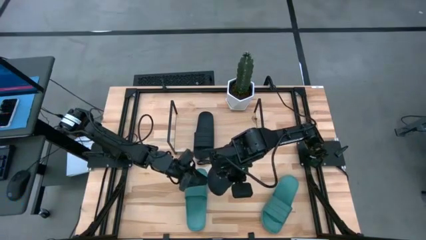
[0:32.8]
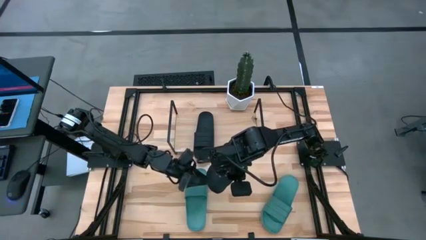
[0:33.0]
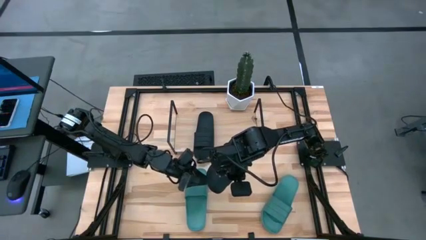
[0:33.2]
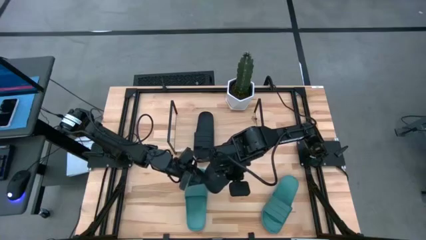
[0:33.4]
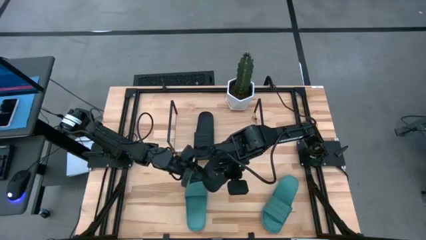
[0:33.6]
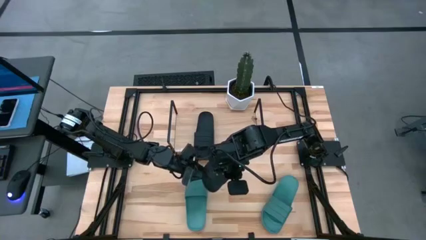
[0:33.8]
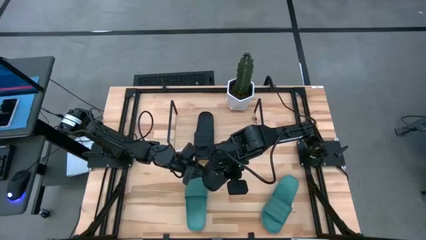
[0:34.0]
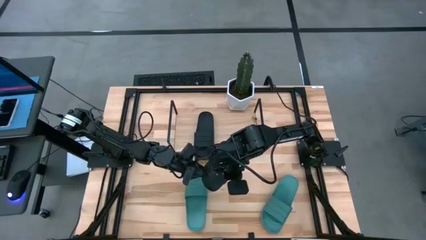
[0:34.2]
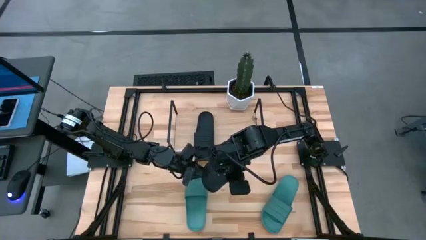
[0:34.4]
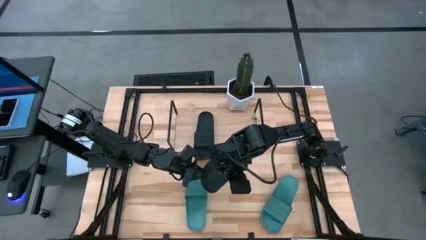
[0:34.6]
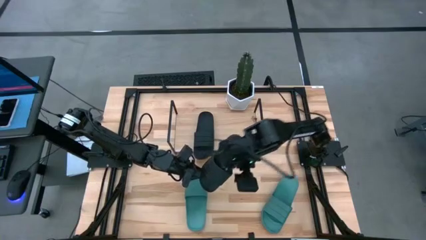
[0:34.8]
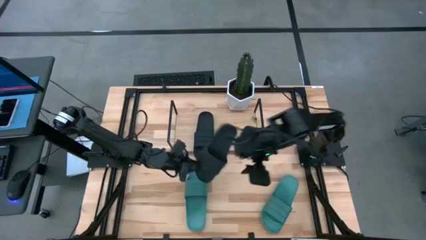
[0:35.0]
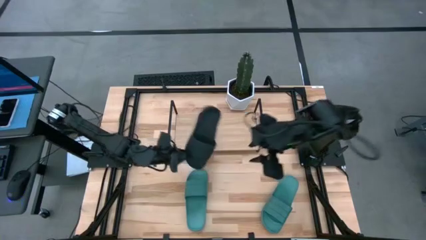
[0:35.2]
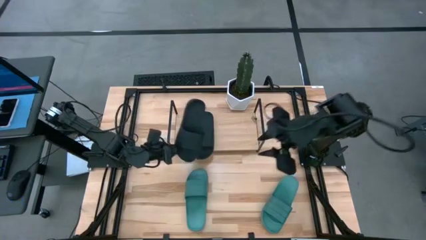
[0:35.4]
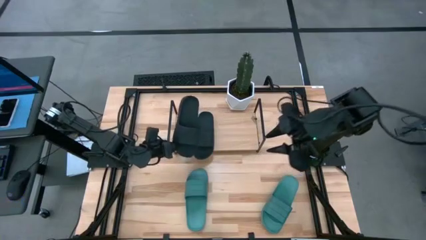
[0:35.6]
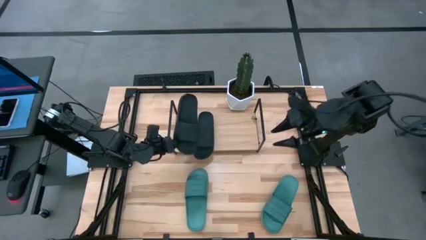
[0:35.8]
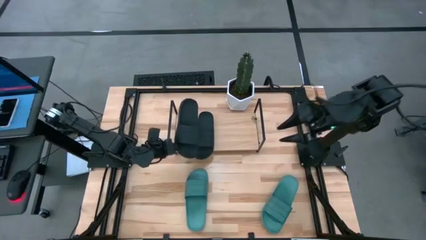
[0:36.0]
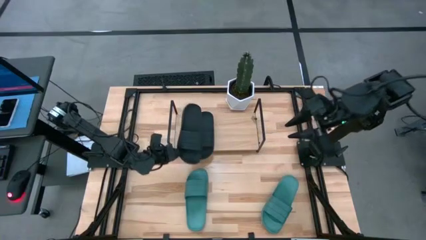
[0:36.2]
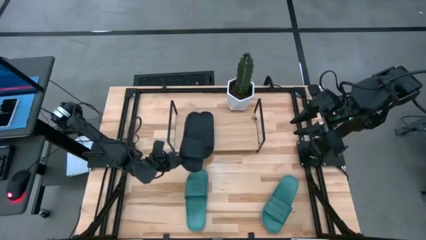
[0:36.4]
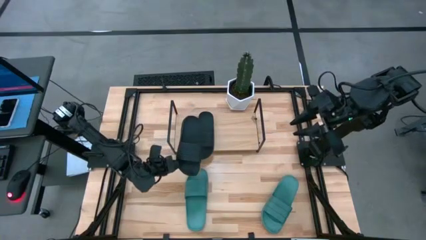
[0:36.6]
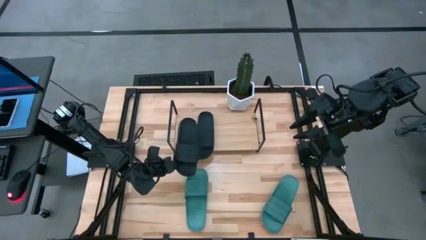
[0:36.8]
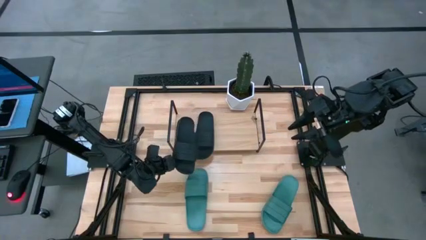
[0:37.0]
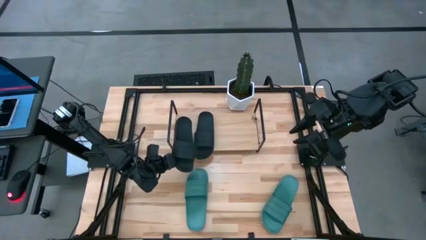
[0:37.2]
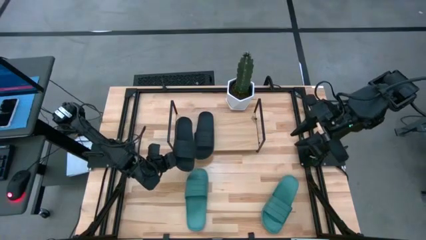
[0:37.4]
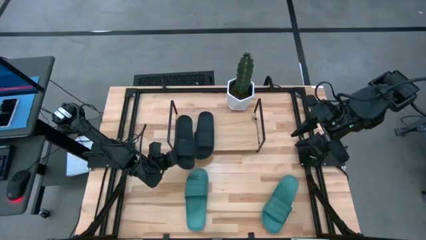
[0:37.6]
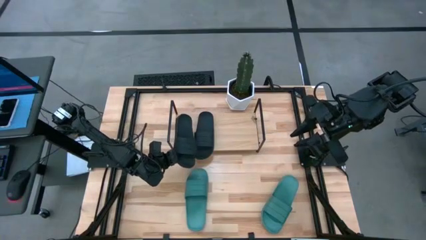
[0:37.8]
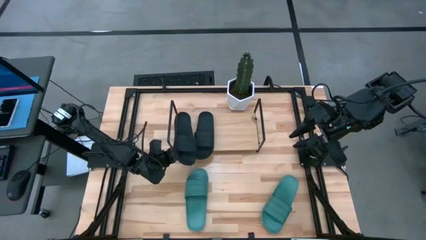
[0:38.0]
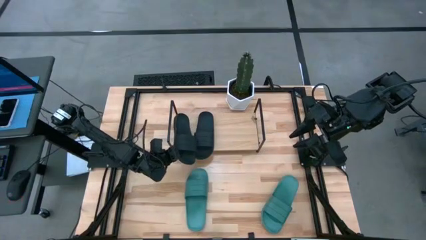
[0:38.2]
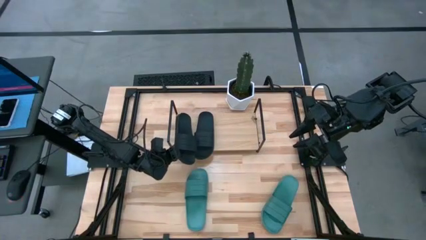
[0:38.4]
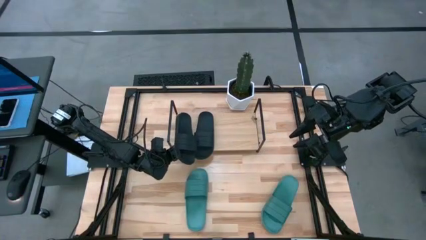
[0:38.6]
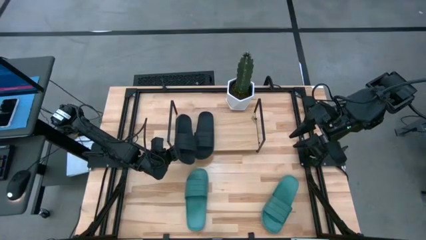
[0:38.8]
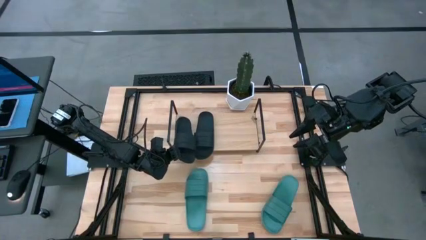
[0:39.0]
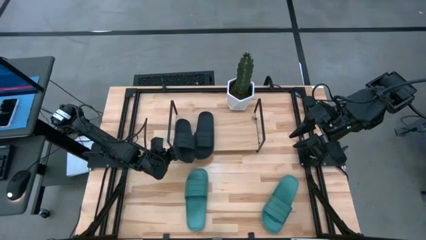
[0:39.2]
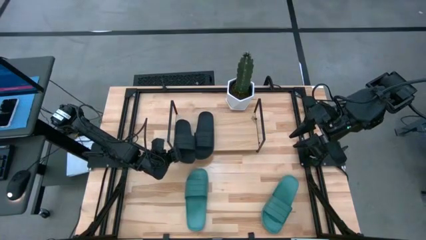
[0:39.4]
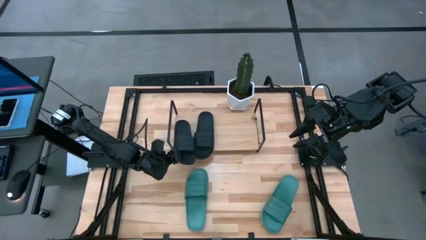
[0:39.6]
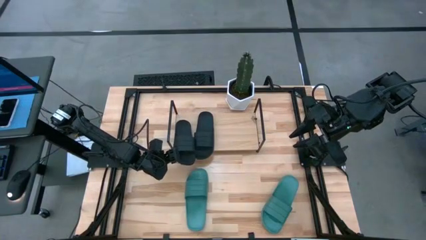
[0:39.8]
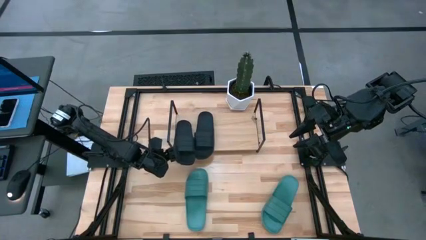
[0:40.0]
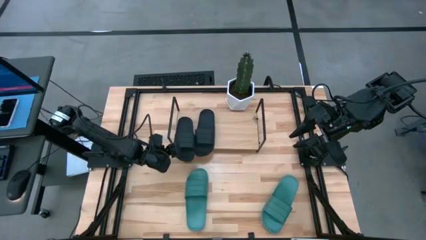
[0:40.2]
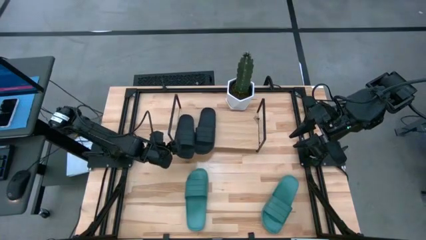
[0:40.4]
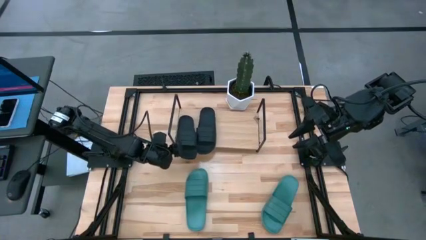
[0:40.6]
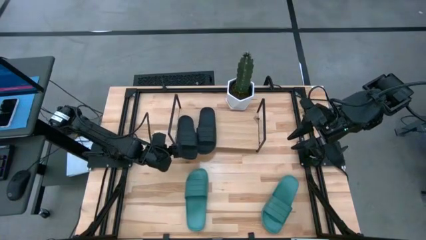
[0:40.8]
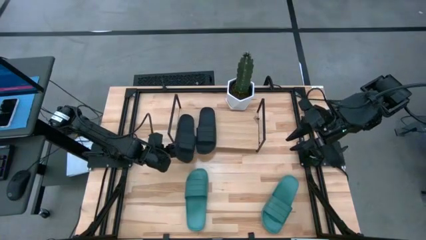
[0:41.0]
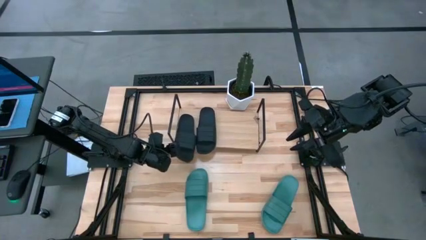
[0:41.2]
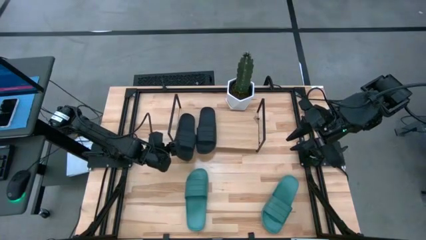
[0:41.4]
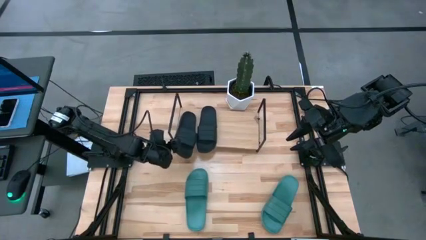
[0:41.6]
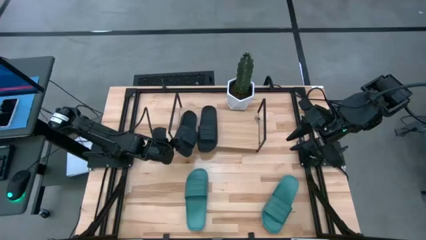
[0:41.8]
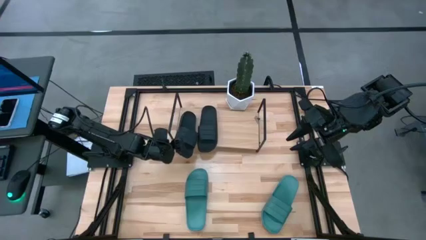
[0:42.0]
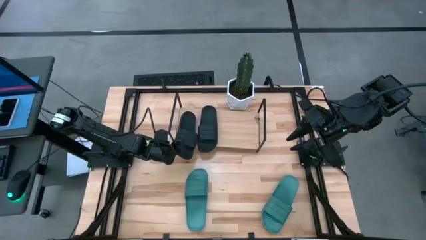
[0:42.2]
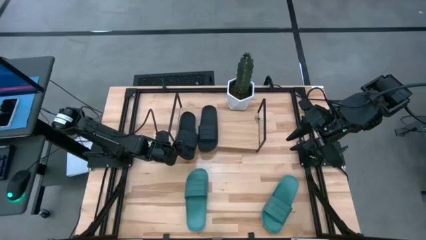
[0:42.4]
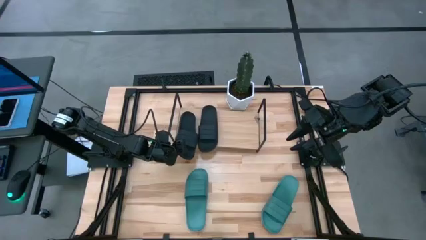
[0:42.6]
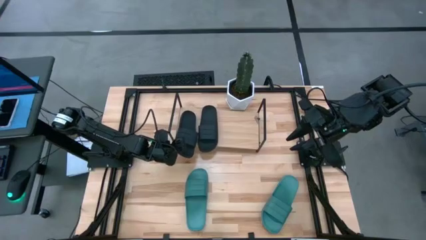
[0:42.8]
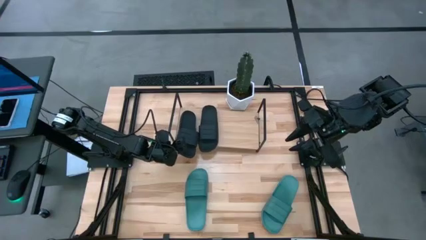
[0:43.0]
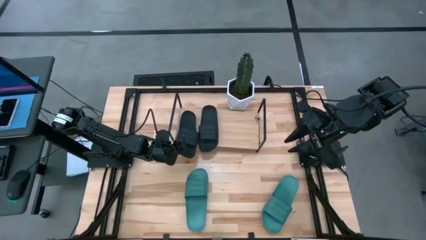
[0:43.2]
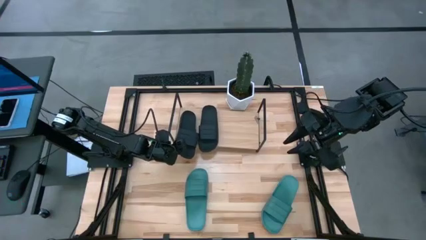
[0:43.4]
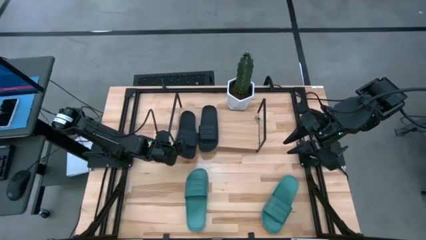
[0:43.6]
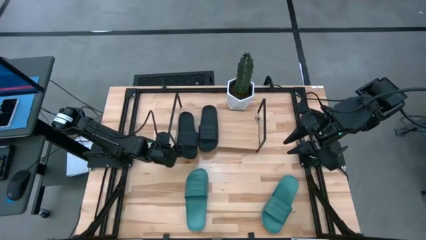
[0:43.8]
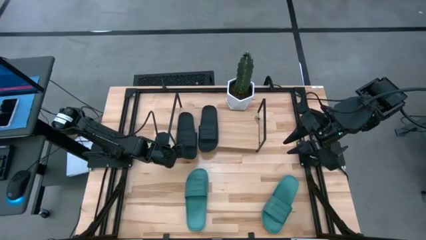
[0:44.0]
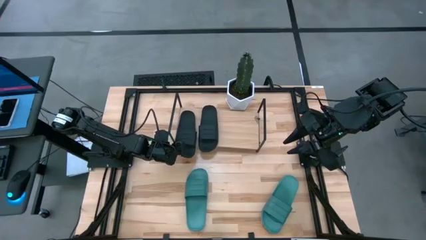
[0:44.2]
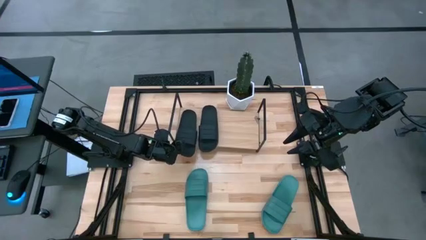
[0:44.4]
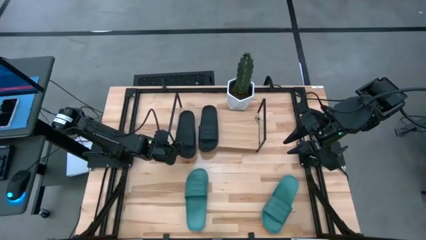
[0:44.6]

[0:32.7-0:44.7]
Task: Pick and place slides into the shelf
Put the black slipper on the shelf

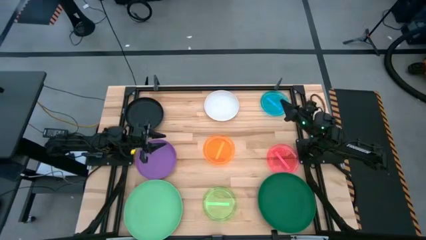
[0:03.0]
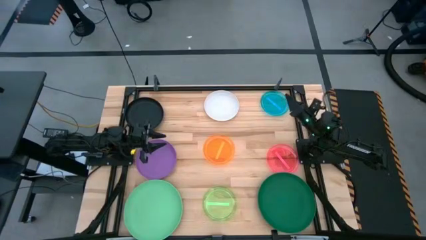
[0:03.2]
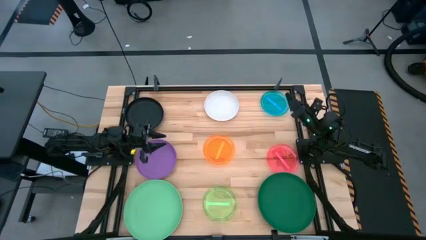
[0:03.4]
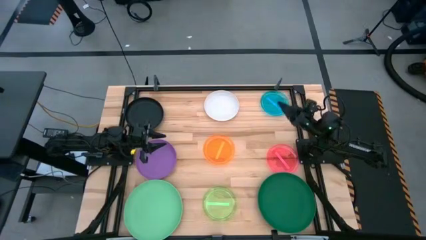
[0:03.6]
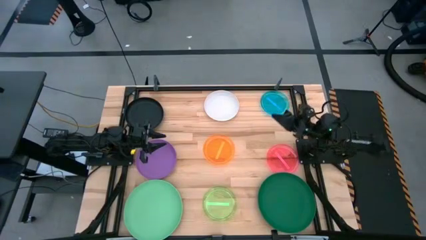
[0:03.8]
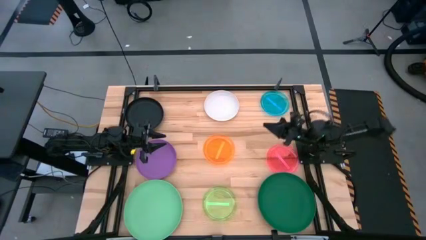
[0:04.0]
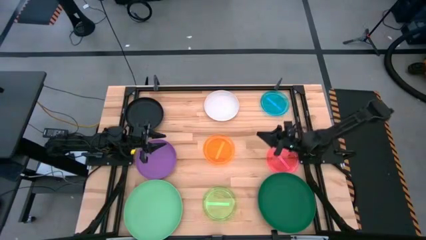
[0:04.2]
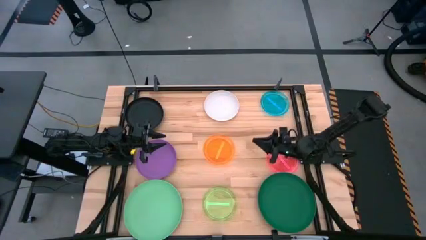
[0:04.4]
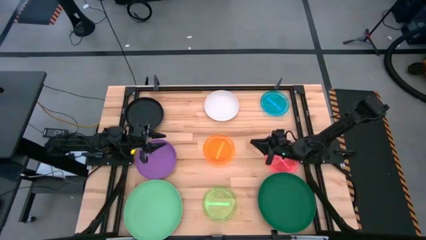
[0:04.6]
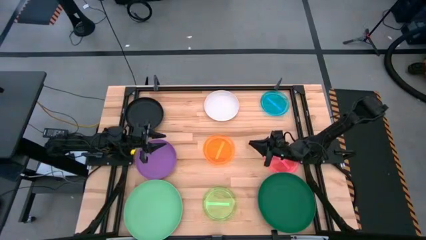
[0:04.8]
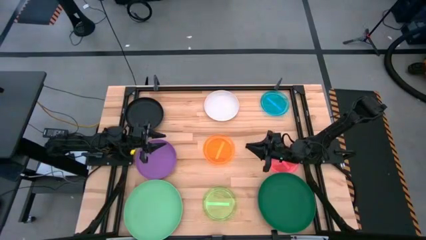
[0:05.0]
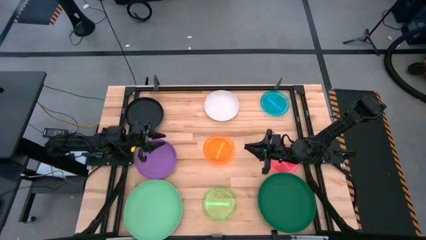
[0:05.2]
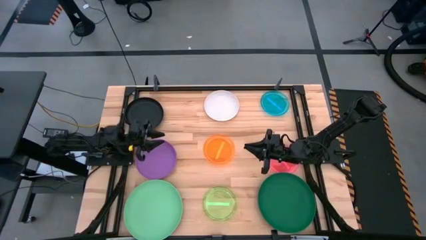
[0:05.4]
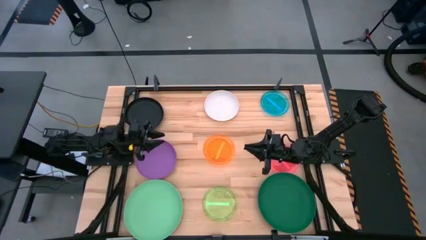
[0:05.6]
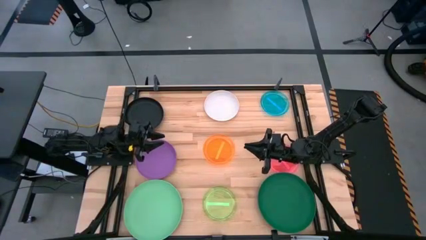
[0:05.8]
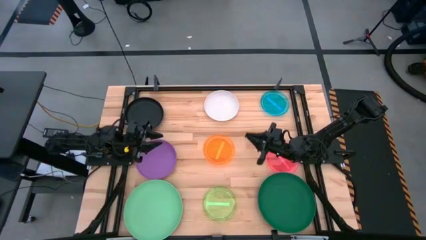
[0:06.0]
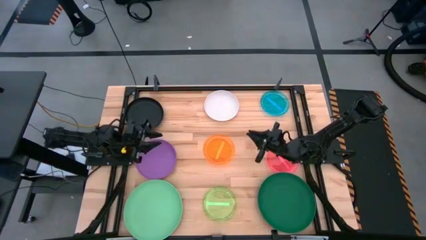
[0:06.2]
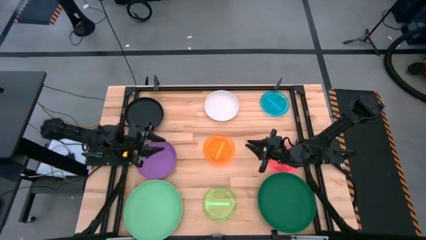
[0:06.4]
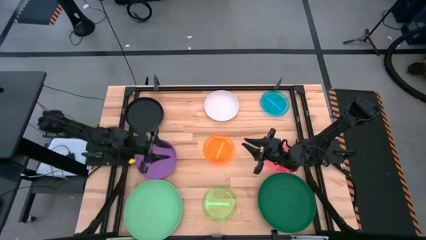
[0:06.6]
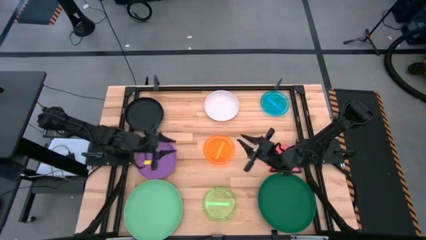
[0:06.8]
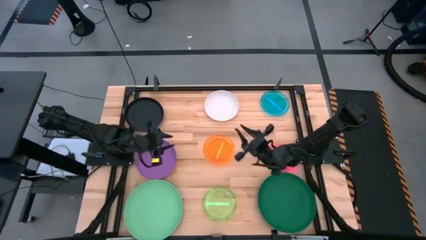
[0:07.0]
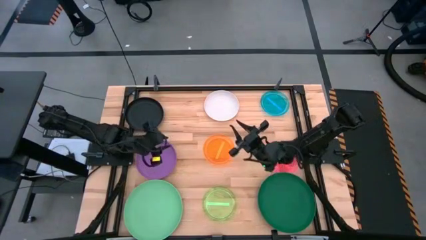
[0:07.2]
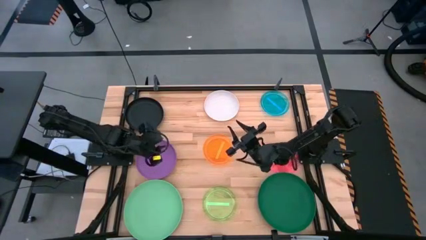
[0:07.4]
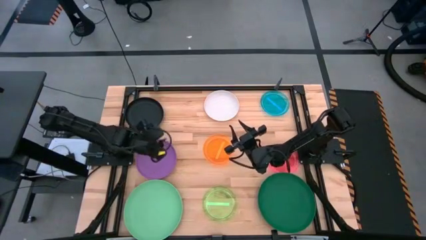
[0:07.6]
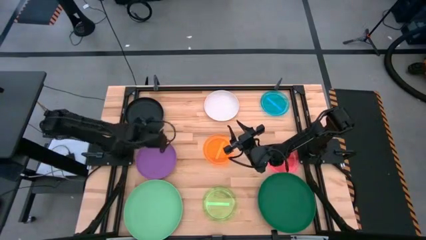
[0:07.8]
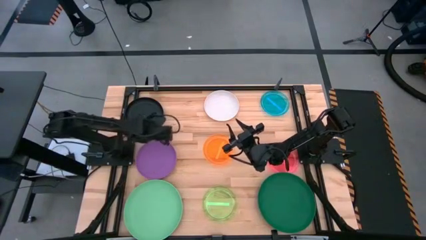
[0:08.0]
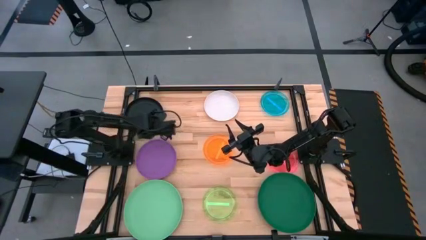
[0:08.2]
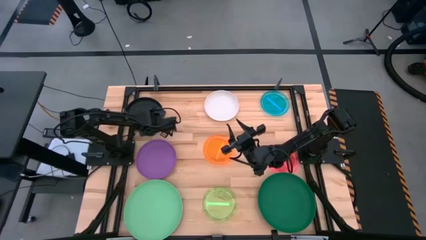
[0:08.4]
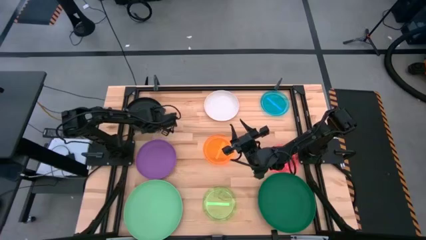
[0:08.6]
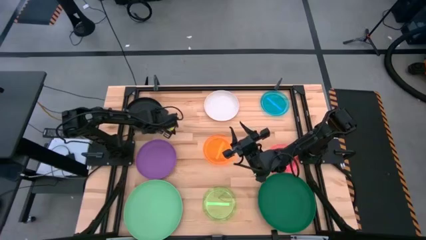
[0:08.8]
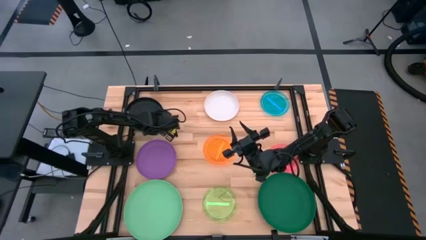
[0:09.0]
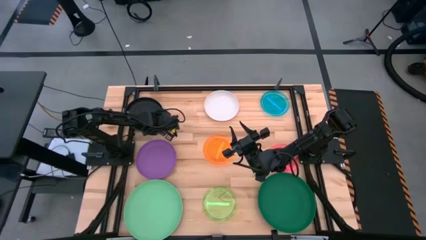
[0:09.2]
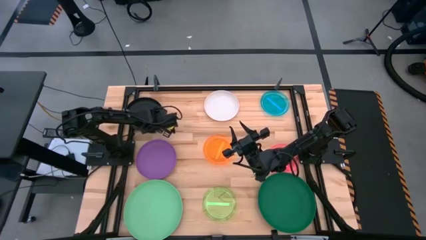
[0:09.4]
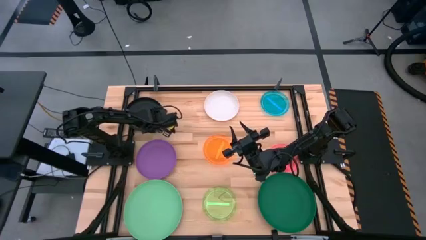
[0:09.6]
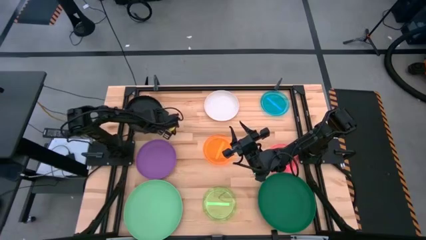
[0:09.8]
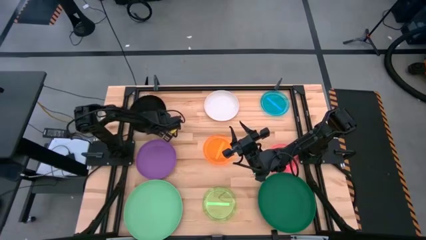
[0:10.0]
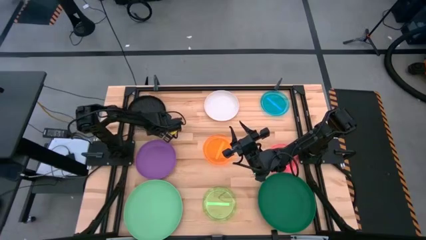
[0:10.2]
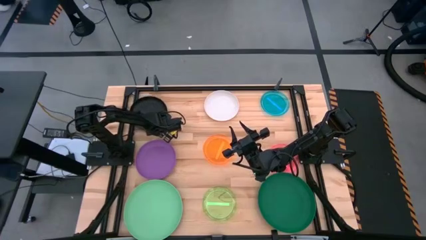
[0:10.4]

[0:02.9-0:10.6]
Task: Stack plastic plates
Prepare the black plate on the table
